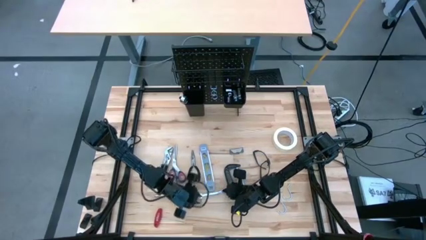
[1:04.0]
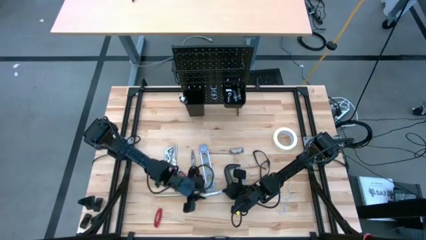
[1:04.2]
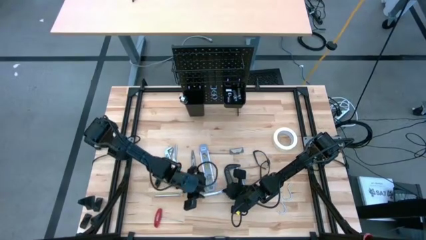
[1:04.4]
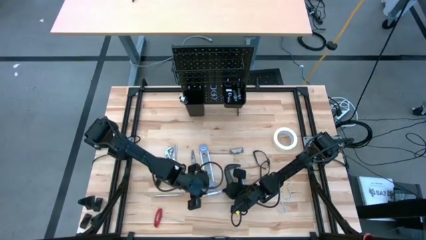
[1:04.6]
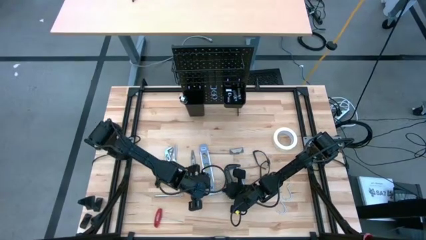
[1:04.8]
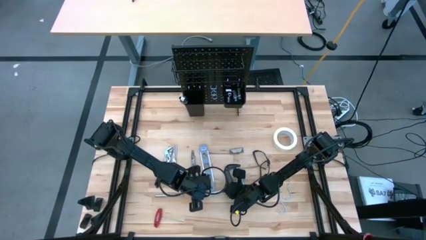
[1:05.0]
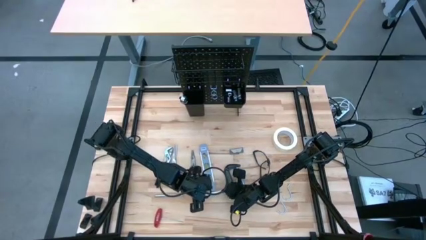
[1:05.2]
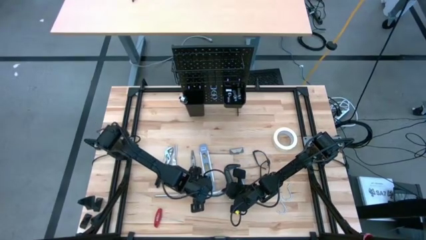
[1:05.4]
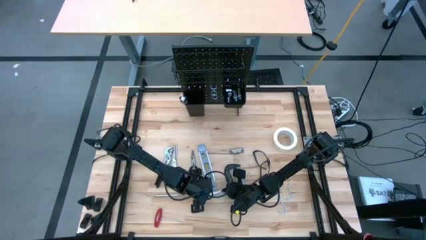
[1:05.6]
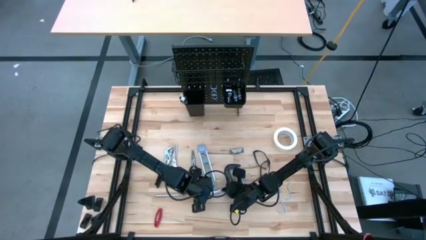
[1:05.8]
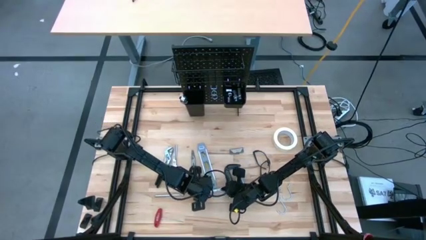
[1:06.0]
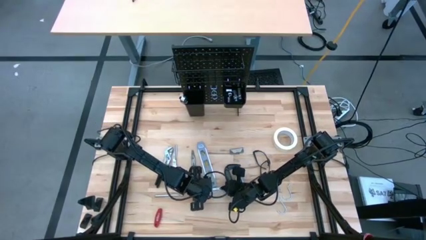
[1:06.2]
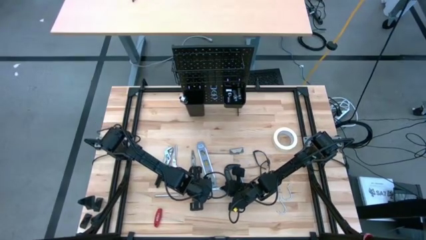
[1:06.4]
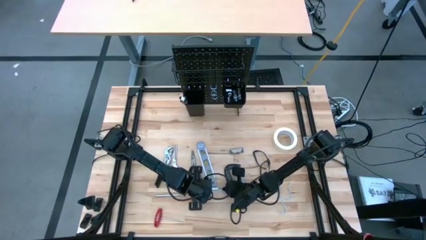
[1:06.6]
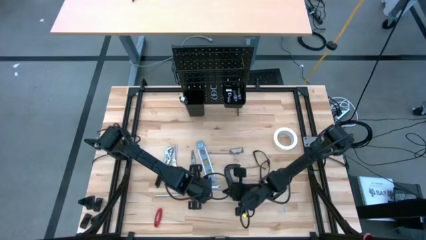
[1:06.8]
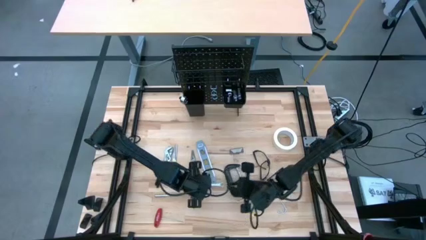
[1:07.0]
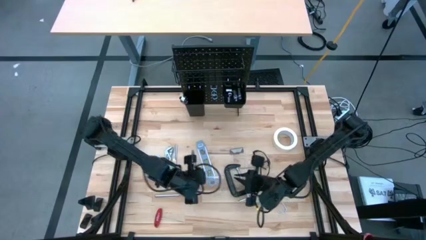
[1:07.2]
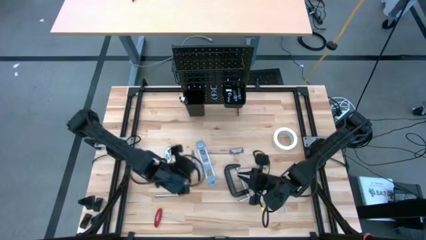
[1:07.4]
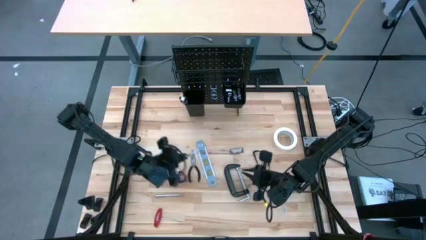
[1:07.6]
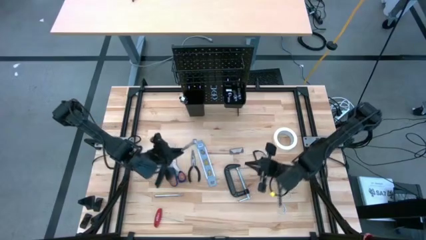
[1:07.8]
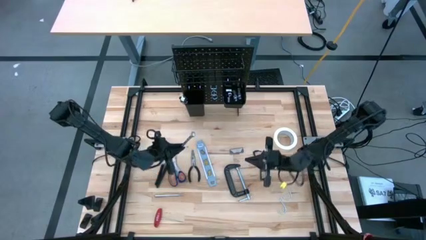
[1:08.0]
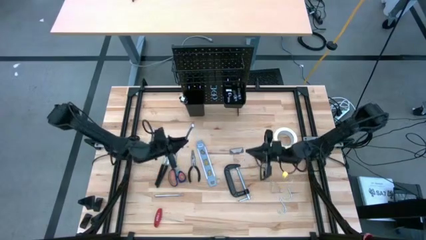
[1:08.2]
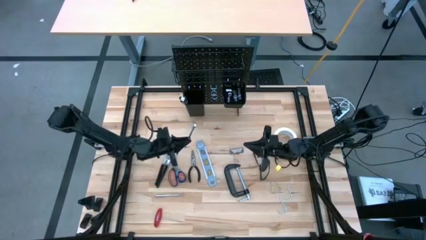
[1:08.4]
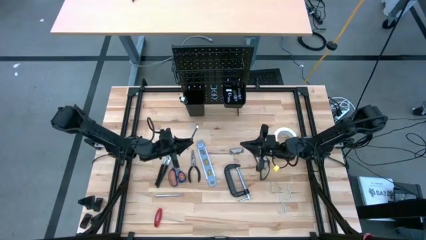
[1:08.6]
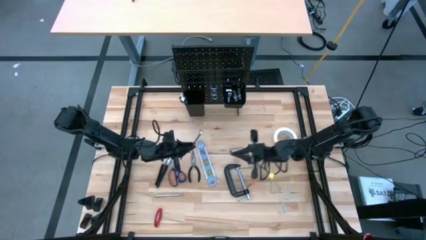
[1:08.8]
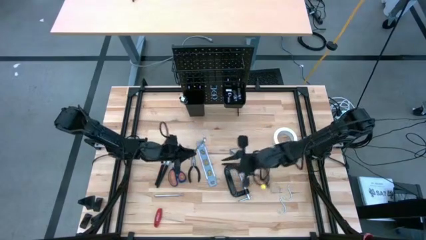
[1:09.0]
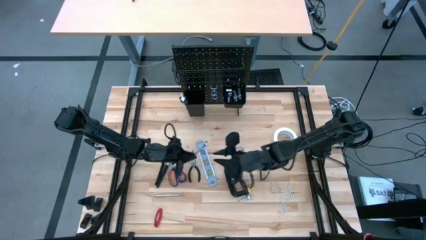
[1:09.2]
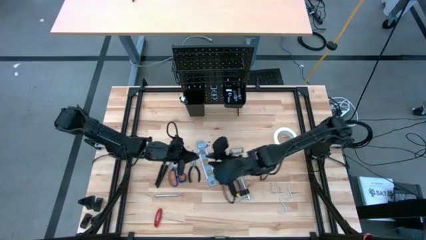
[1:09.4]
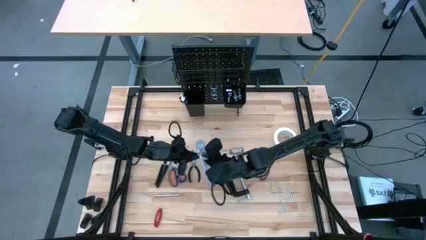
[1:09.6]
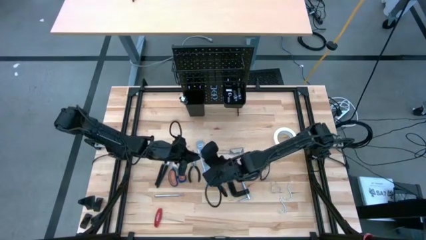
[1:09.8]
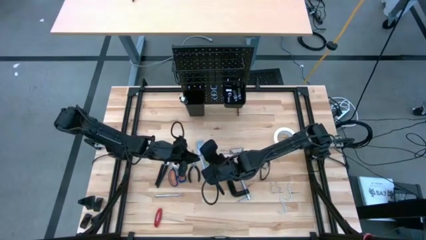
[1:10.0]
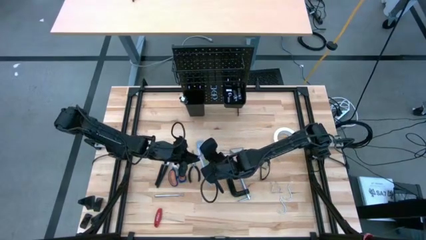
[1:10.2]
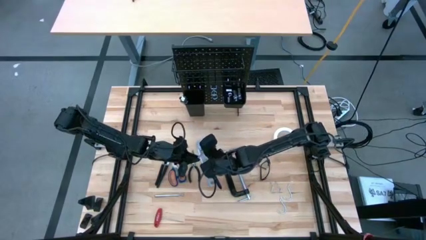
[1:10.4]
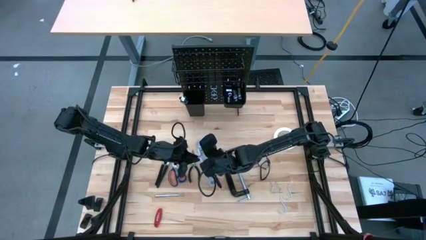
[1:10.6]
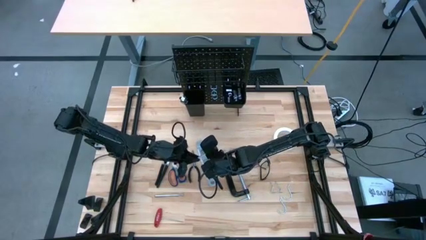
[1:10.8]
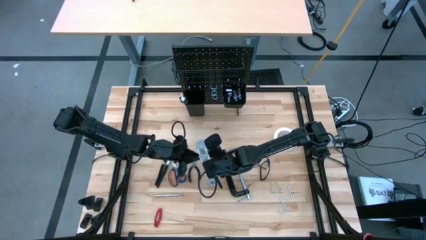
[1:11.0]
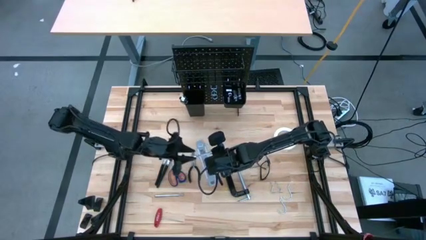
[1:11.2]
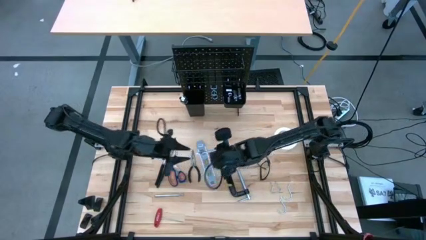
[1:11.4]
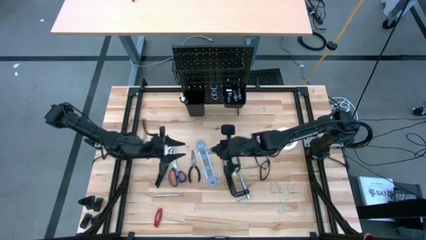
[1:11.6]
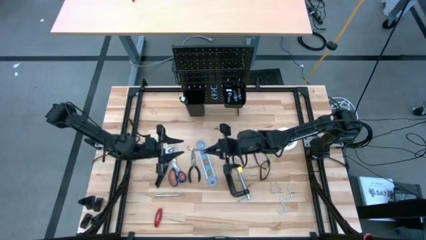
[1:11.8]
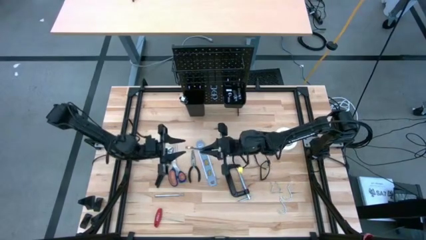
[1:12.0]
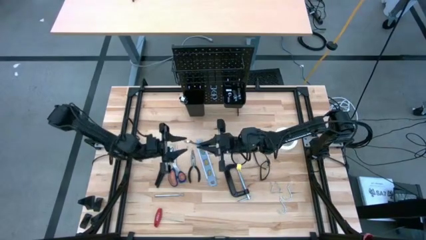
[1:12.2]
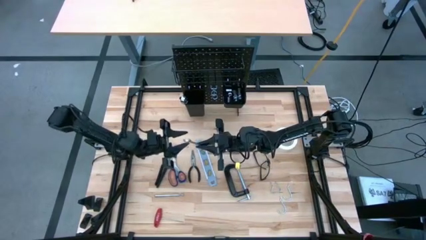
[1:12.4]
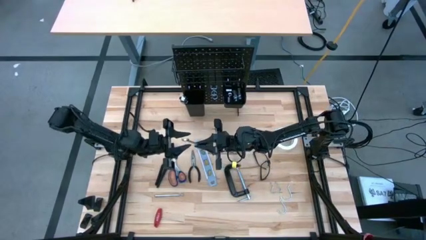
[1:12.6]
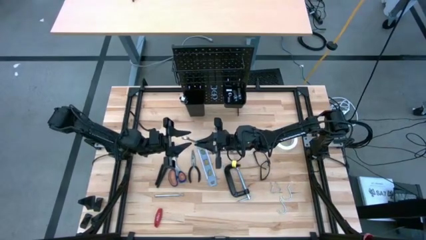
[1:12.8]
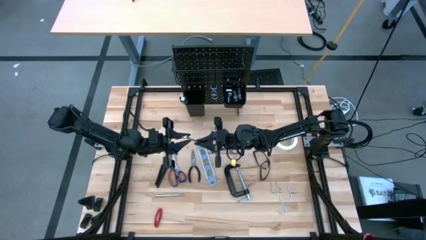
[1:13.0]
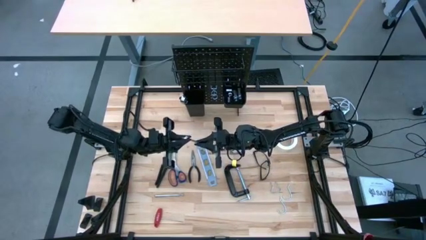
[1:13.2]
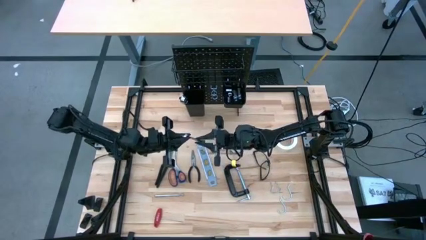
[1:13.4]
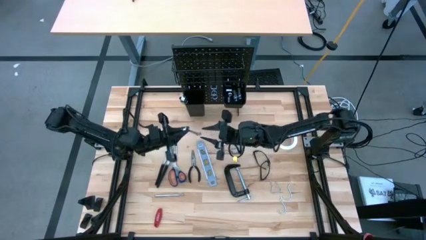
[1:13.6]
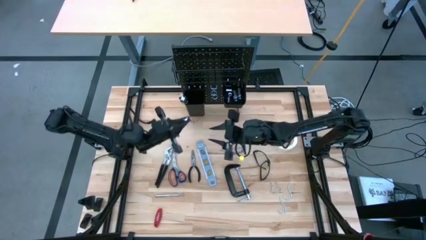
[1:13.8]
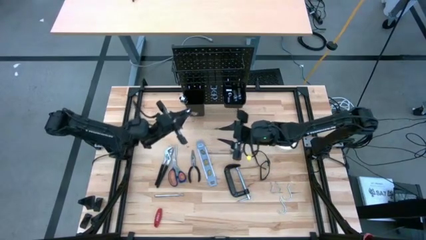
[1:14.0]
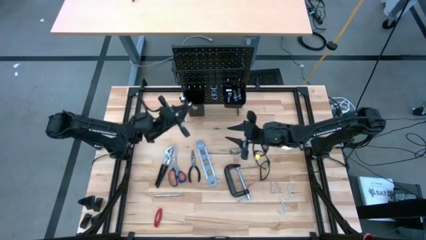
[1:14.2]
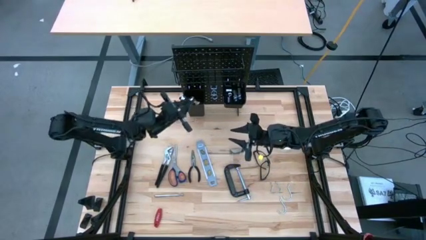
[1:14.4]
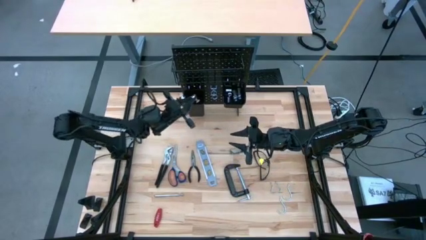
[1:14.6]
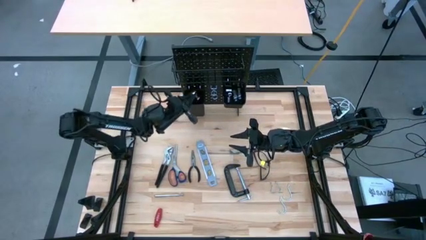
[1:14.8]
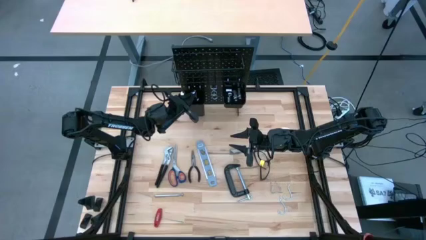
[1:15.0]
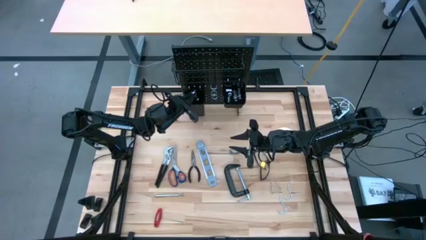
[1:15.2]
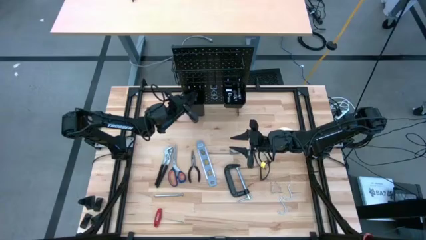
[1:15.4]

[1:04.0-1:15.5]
Task: Hang tools onto peg board
Put the wrench into the left black bin on the peg board

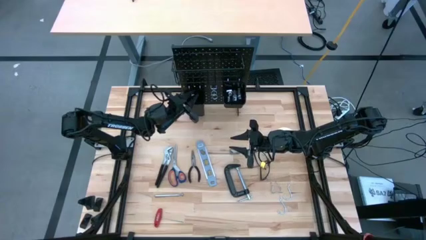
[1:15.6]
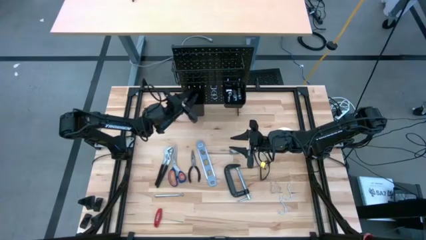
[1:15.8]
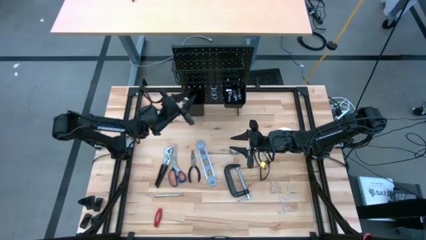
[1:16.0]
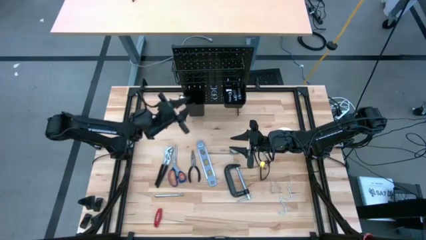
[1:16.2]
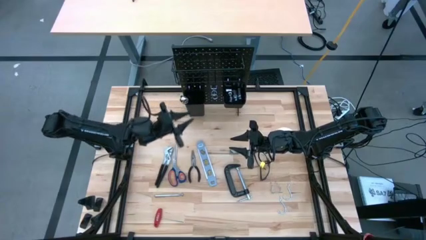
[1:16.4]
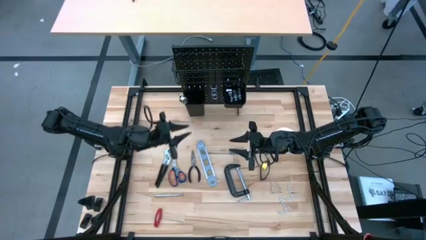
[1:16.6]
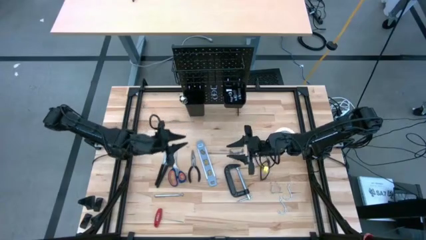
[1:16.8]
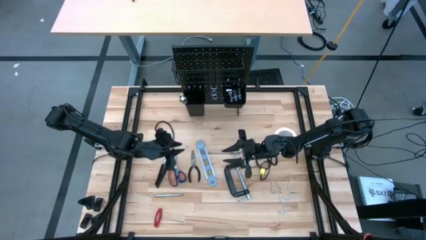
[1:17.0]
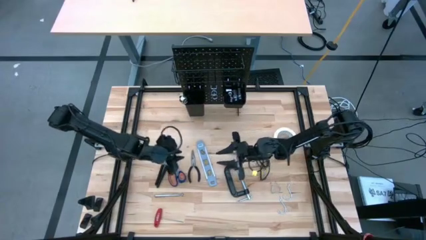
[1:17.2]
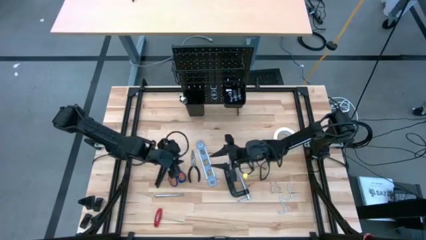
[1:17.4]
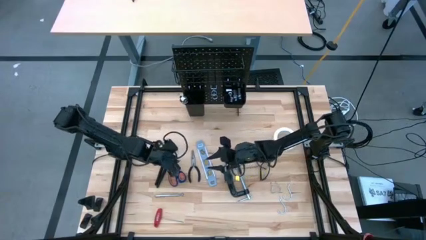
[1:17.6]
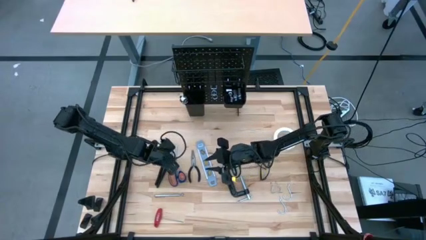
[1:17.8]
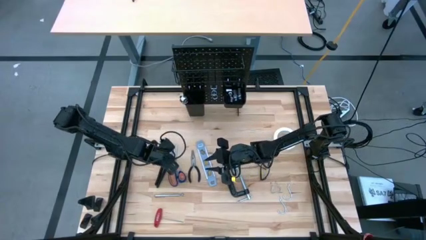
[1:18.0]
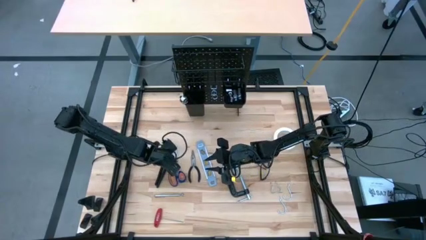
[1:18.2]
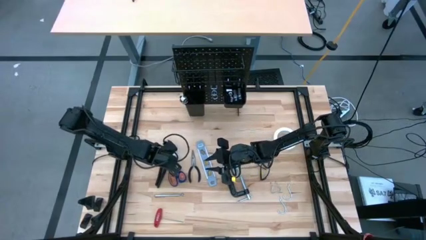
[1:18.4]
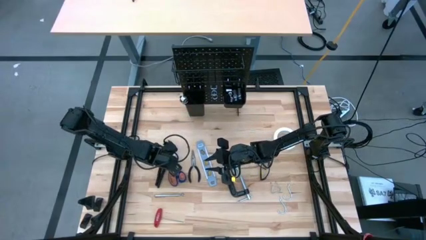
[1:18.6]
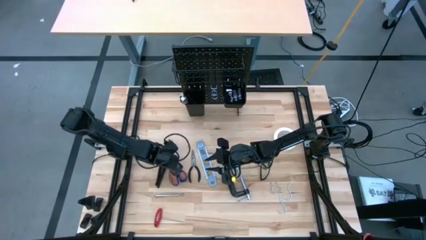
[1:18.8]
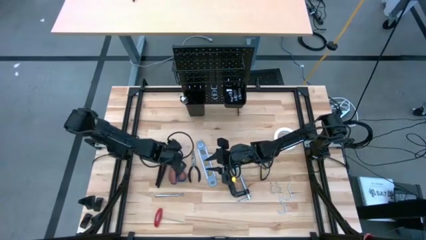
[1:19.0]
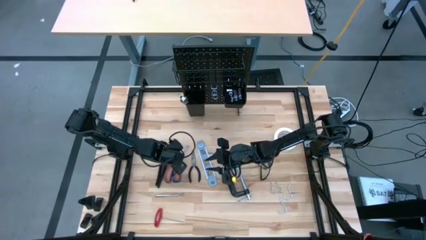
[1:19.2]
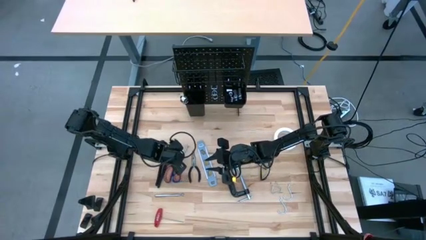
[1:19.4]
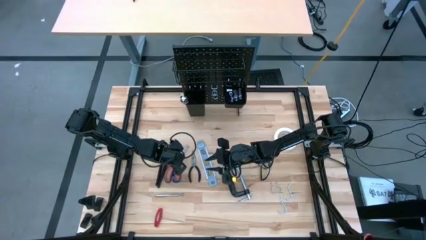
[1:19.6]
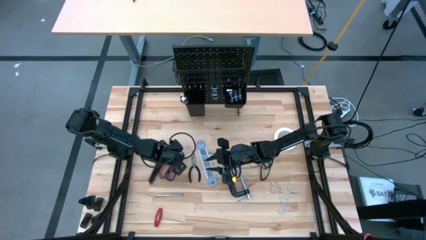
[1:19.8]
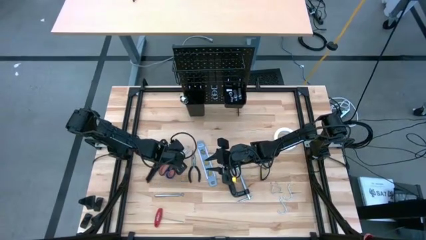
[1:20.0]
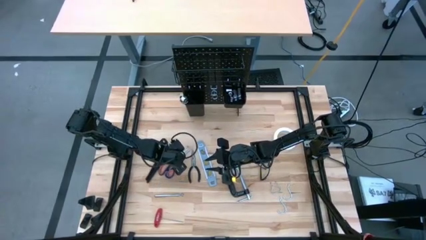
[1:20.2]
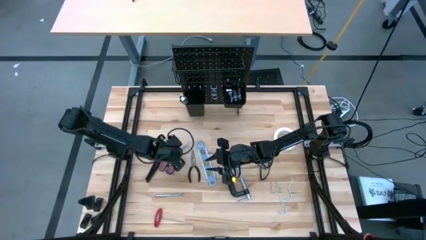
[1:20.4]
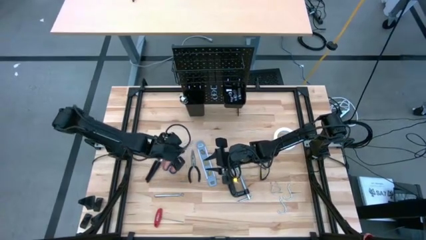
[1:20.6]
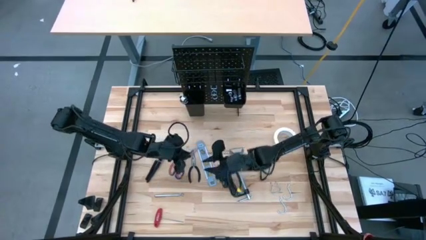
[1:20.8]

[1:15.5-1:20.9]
Put the blue scissors into the left black bin on the peg board
